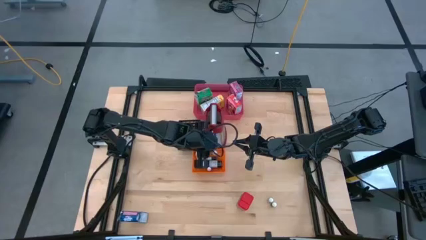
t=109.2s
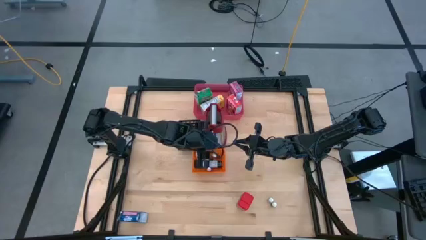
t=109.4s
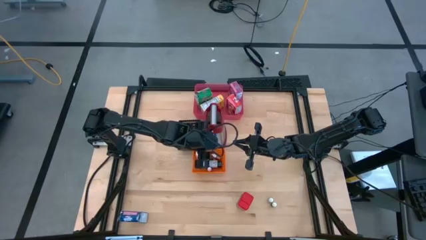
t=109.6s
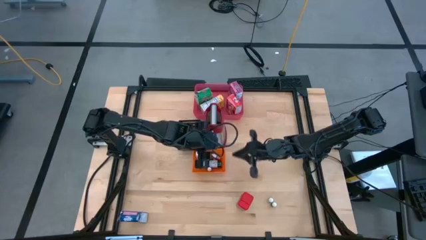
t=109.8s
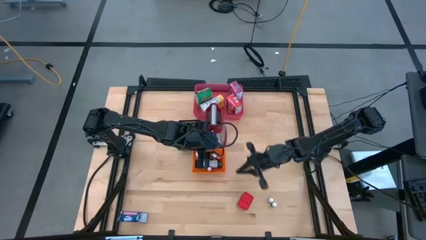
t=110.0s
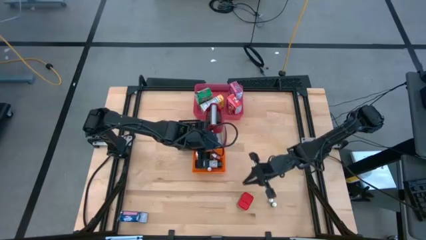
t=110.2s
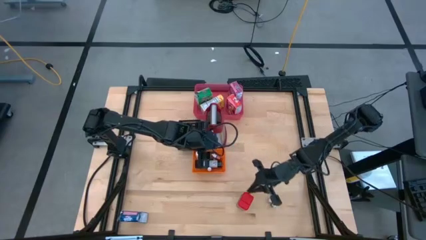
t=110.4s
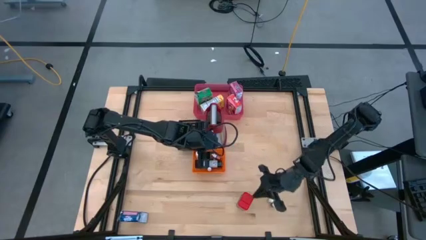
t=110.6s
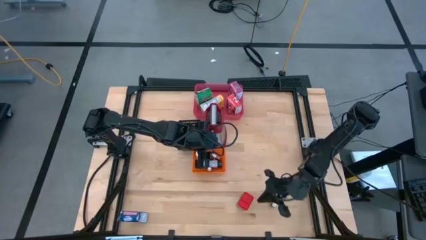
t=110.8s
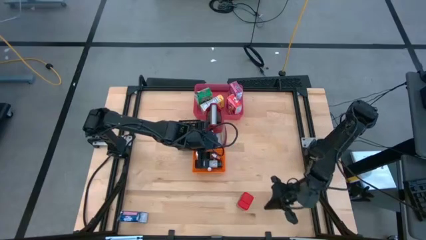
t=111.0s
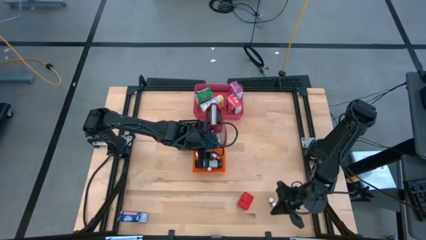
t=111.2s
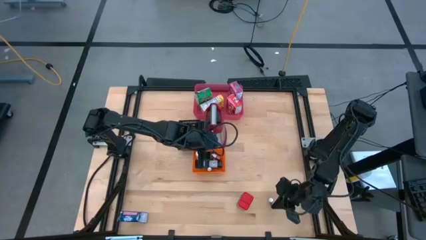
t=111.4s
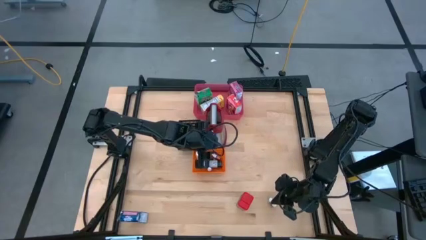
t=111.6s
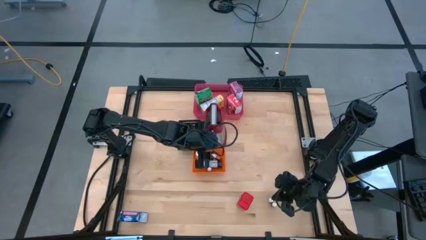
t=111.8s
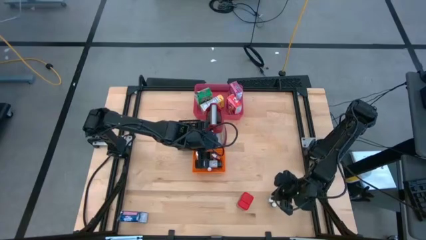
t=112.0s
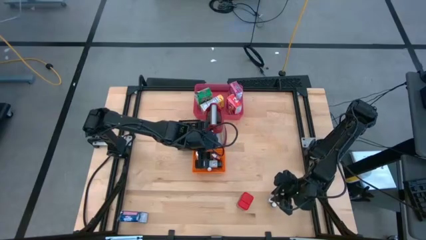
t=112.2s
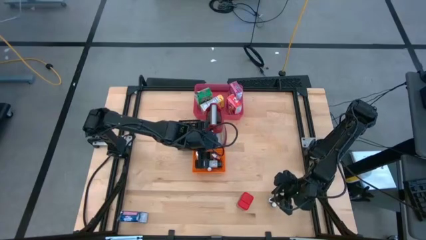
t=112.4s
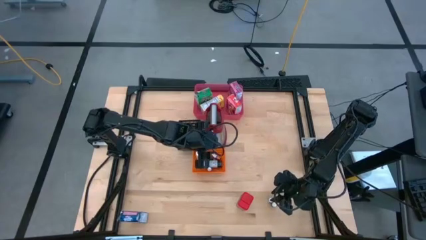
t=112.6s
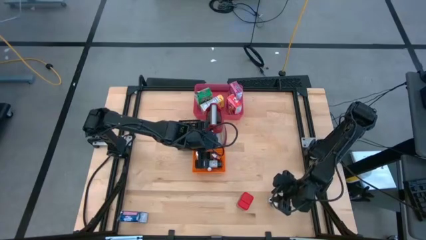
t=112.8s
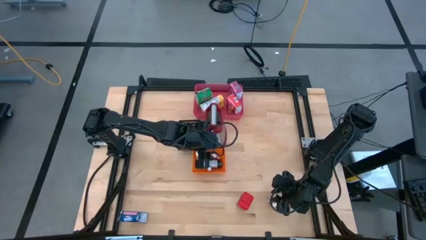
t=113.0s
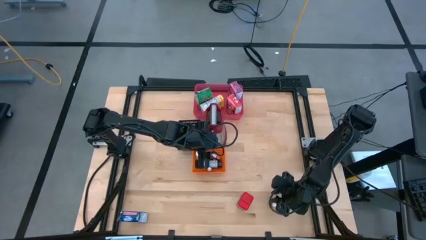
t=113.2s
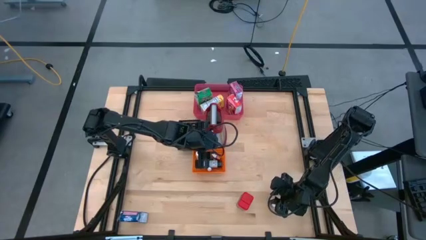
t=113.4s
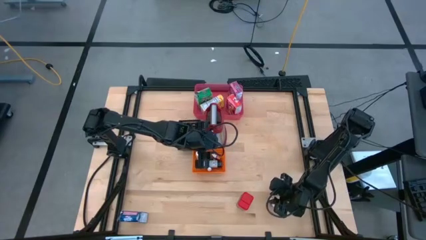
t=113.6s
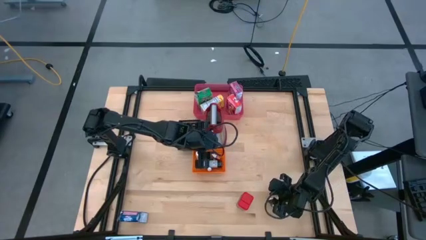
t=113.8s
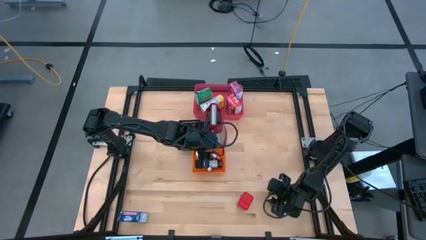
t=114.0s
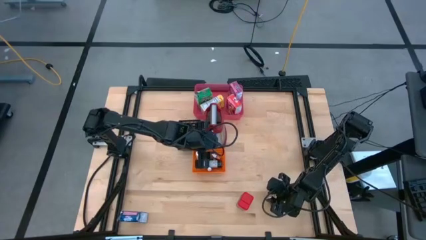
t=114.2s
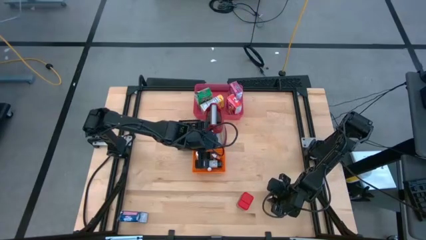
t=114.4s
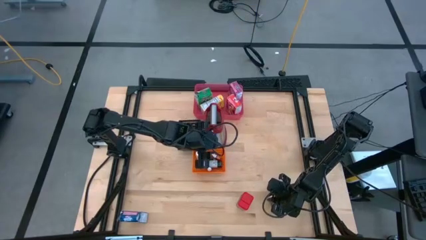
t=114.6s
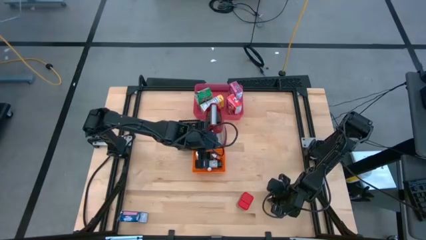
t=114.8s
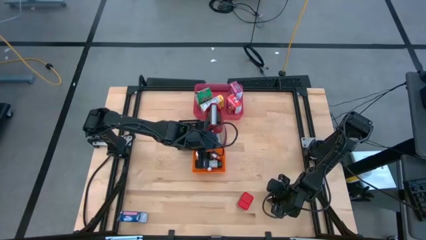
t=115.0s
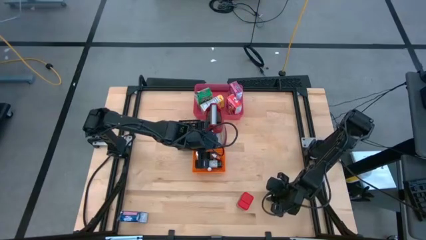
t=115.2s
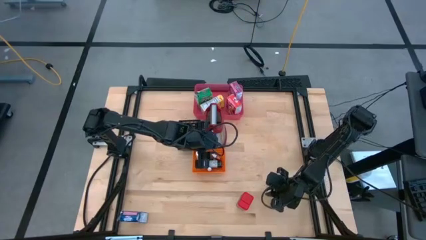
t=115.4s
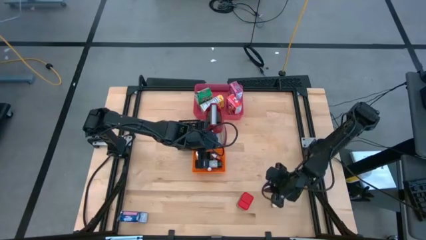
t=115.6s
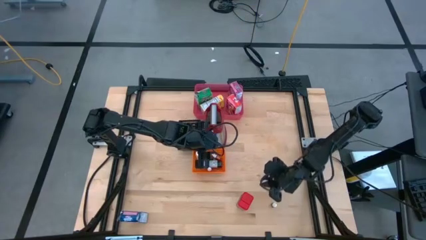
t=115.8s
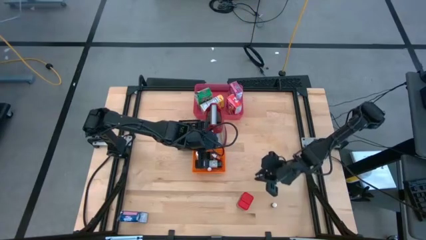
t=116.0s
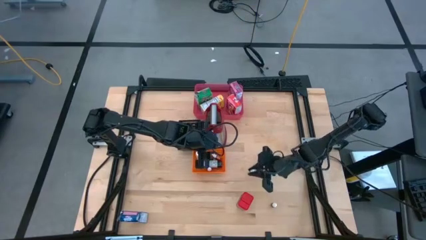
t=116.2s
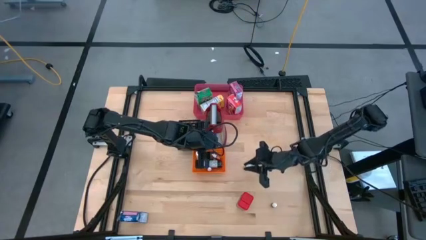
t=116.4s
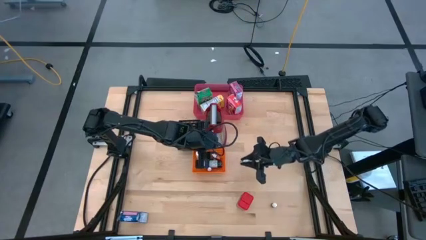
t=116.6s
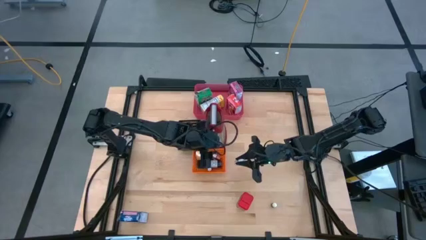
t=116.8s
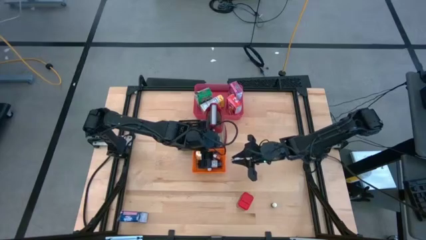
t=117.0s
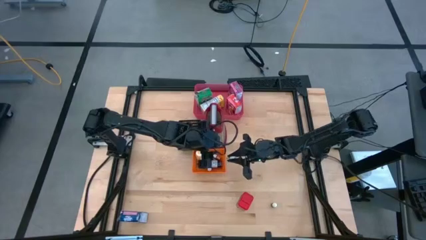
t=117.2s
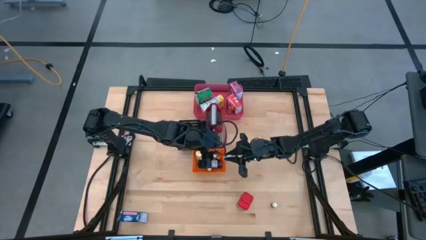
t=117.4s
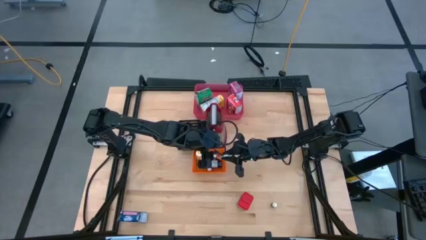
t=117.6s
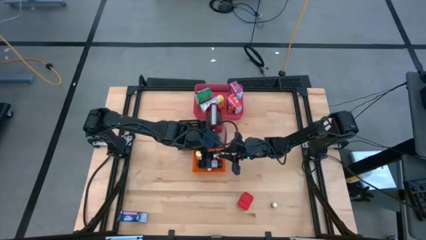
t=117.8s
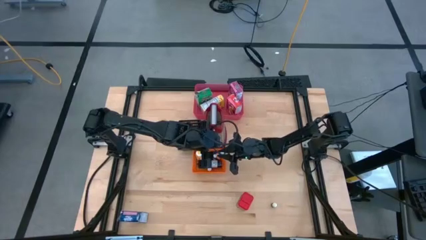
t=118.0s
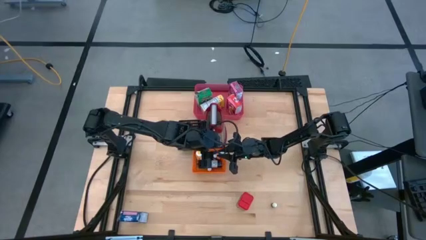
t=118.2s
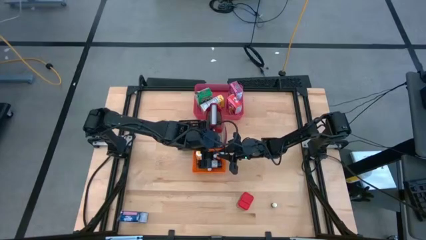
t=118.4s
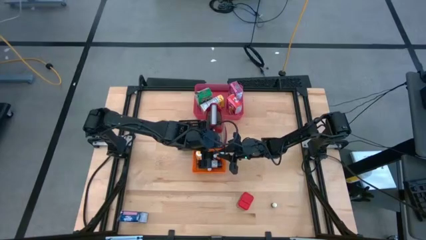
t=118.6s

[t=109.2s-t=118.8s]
Task: Pick & Place Kitchen Items
Put the green food coloring bottle into the orange bin

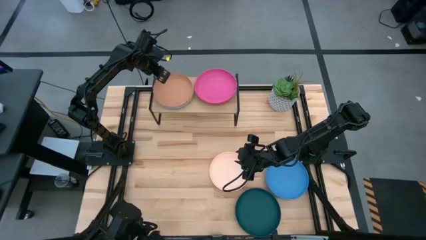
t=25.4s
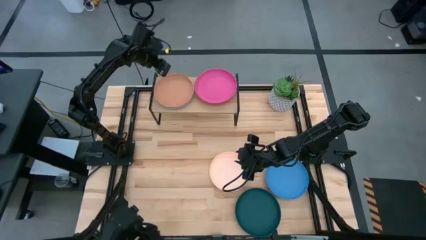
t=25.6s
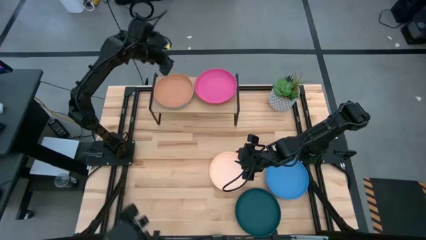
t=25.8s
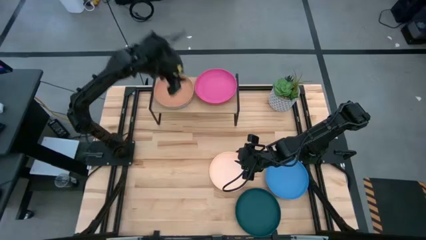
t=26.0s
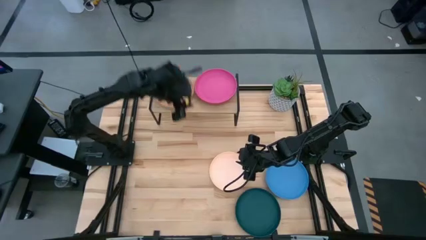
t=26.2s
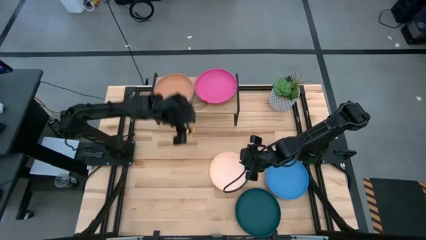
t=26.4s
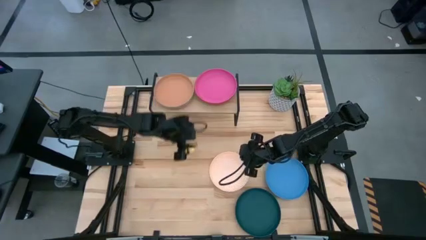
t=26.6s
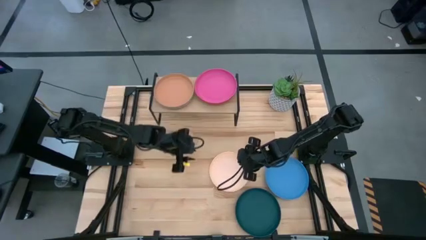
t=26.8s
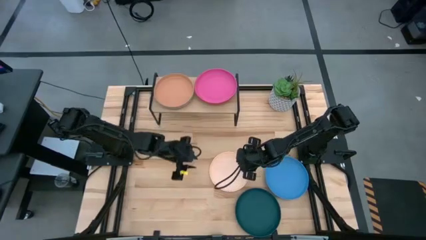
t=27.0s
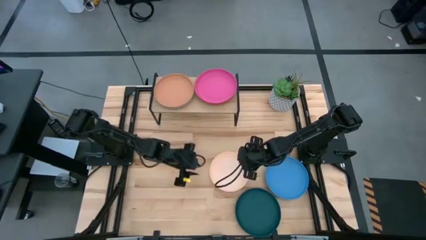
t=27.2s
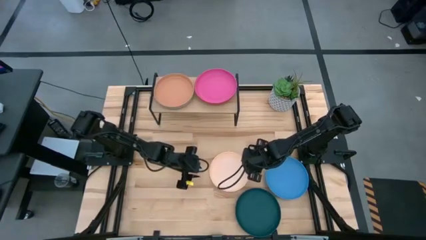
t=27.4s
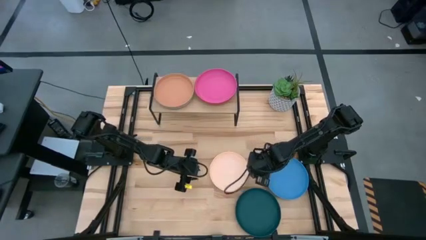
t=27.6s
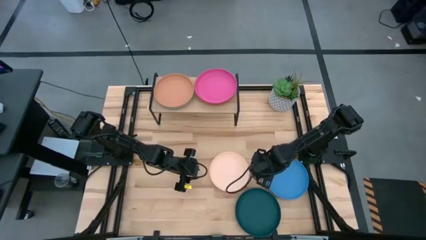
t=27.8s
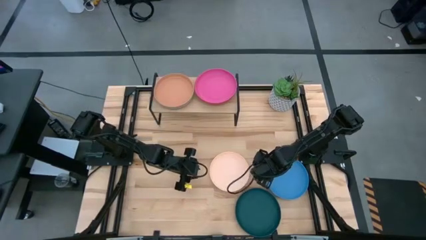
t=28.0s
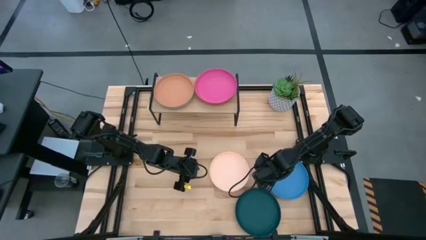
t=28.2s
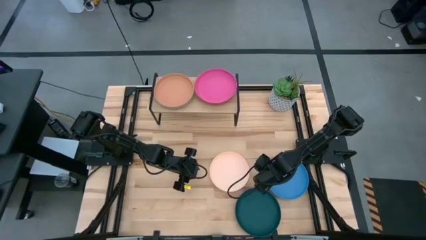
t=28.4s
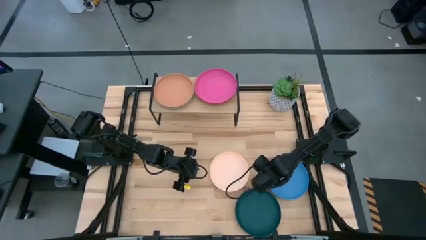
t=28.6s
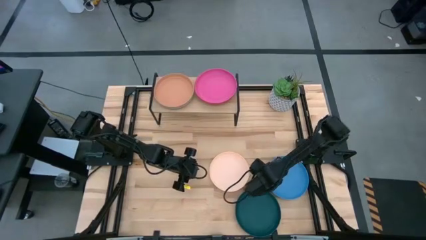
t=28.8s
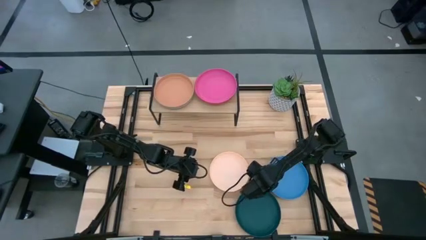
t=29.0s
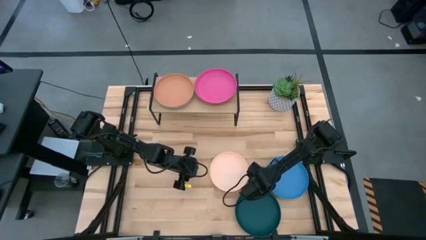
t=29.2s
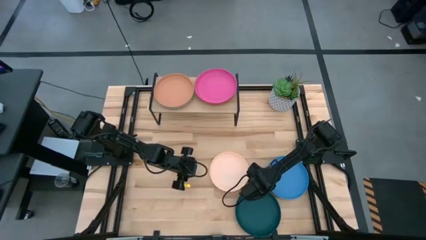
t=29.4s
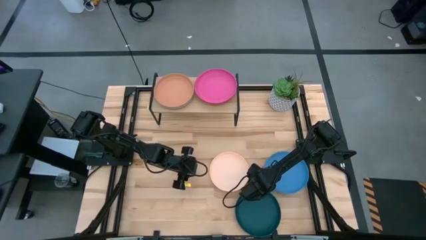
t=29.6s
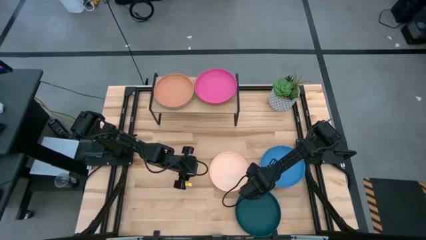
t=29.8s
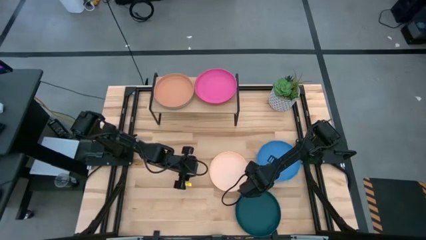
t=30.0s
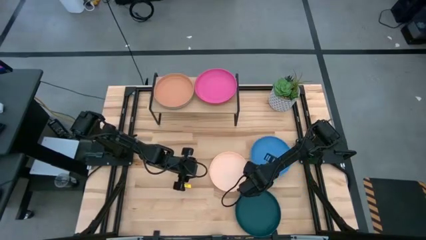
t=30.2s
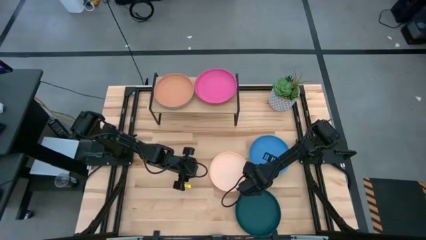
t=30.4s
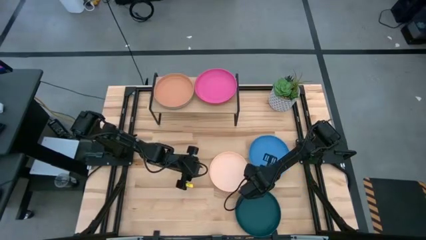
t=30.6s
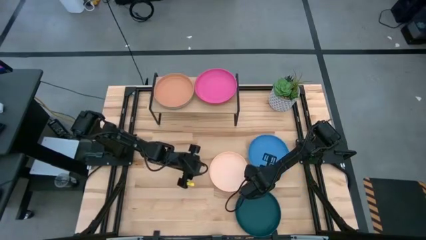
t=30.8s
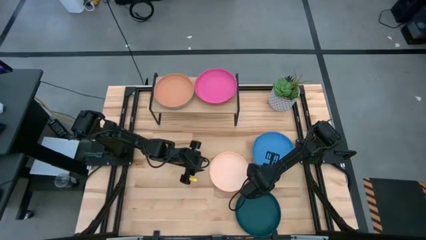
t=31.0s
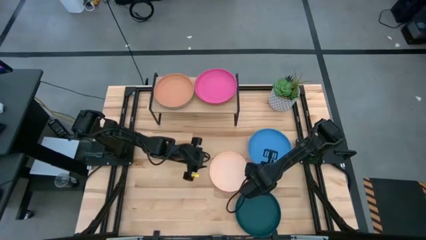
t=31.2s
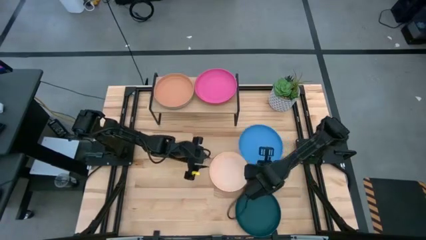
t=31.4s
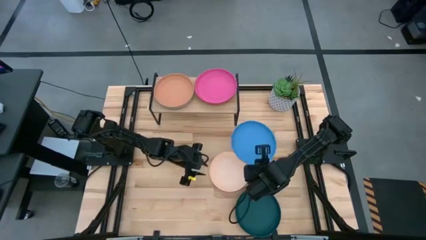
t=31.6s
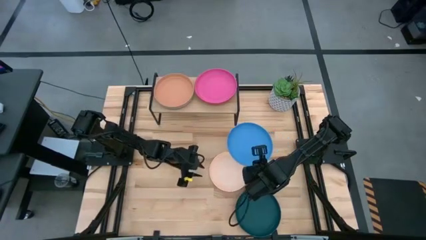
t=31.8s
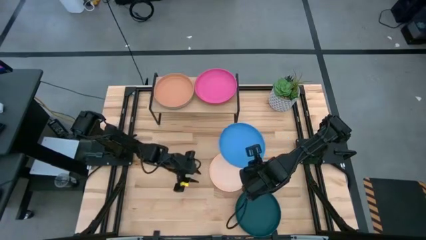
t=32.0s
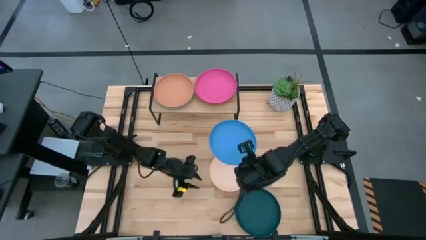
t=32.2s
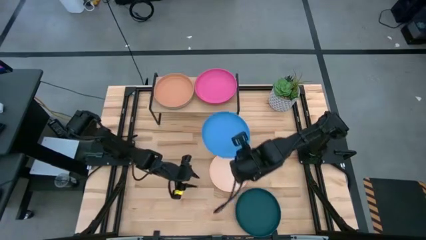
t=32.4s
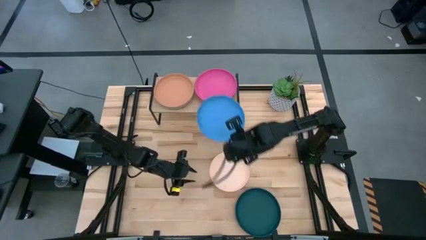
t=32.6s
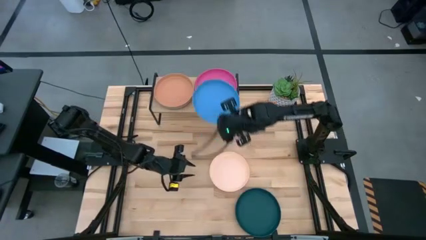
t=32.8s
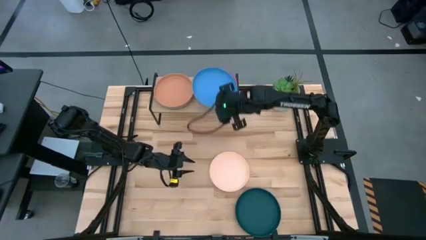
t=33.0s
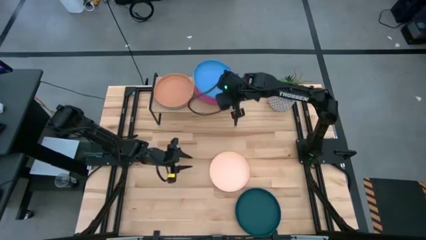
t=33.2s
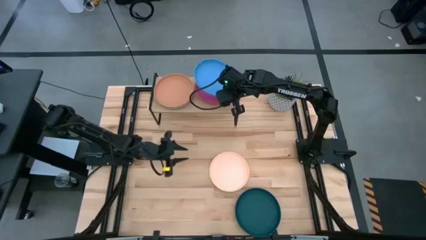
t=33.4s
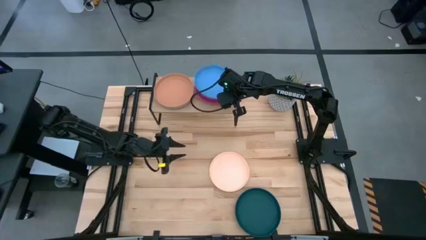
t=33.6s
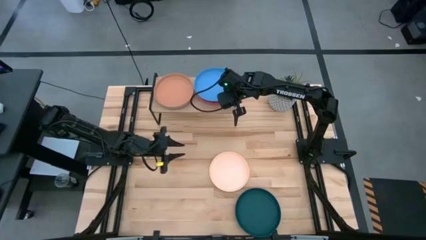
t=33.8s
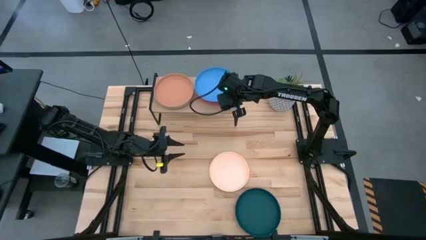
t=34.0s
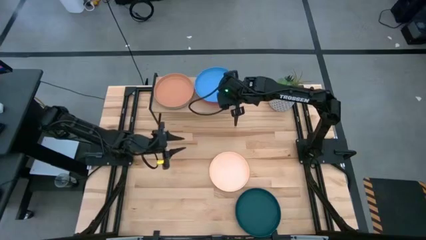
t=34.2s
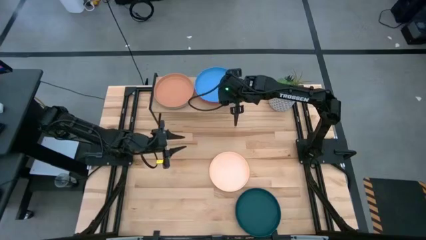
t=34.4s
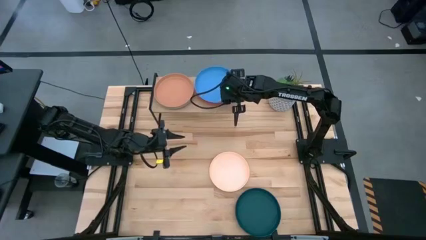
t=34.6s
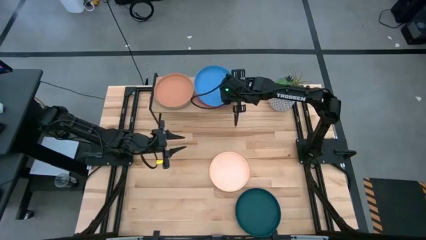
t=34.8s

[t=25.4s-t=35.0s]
Task: Place and stack plates onto a shelf
Stack the blue plate on top of the pink plate on the shelf
